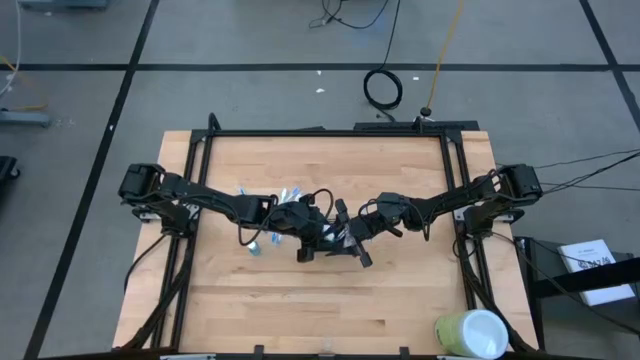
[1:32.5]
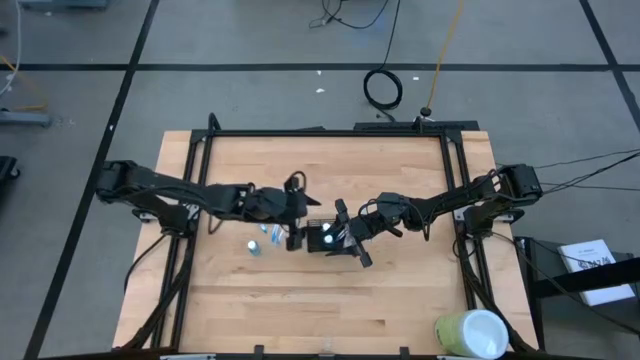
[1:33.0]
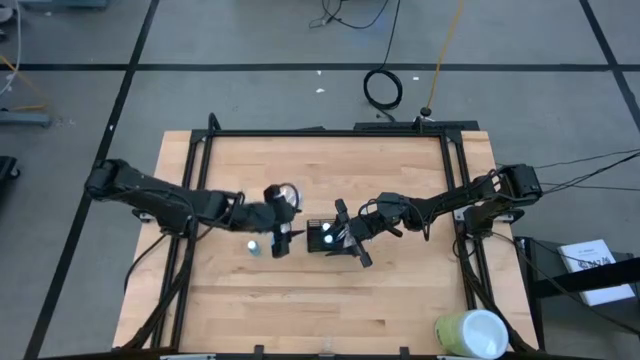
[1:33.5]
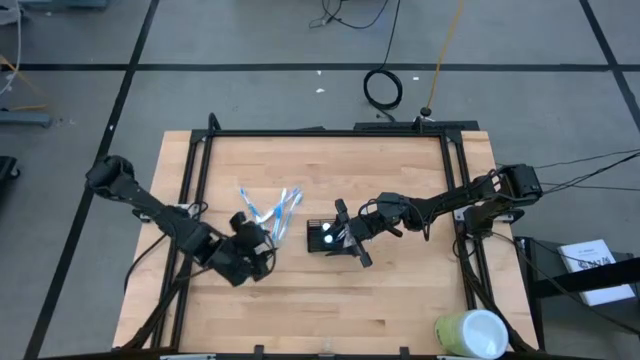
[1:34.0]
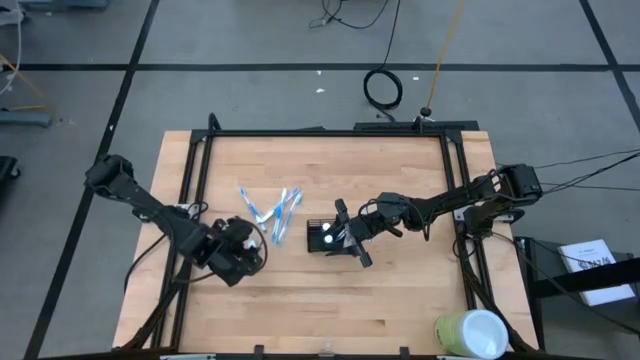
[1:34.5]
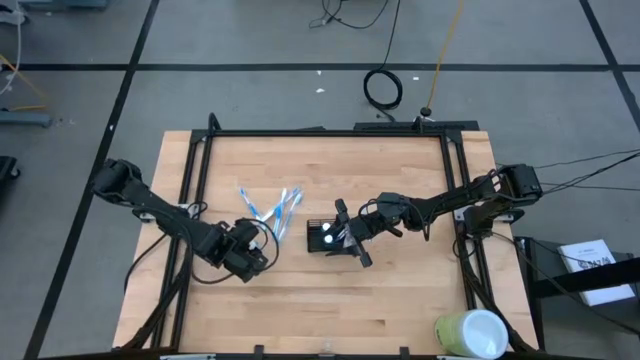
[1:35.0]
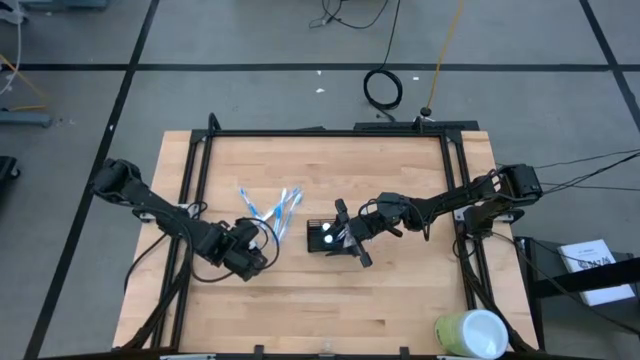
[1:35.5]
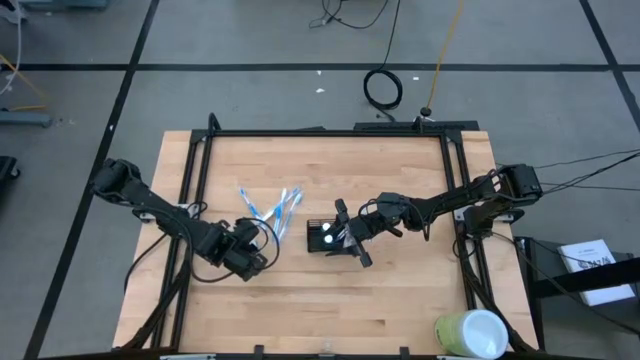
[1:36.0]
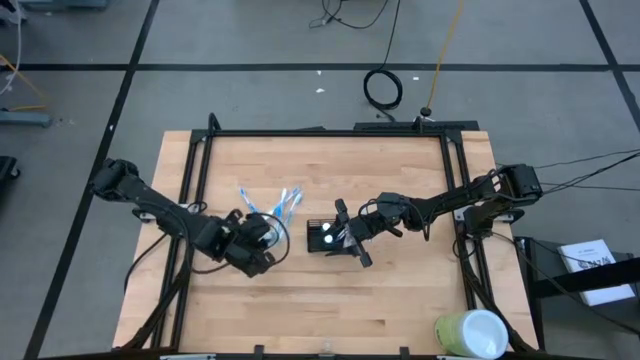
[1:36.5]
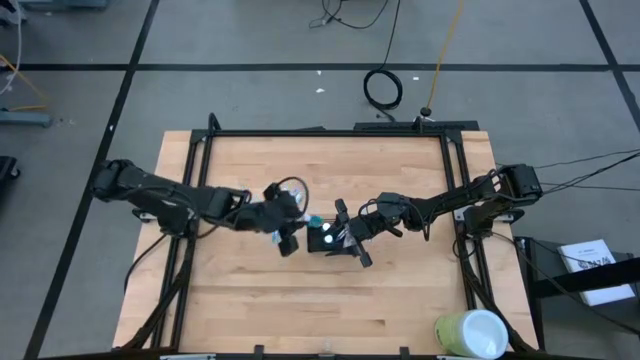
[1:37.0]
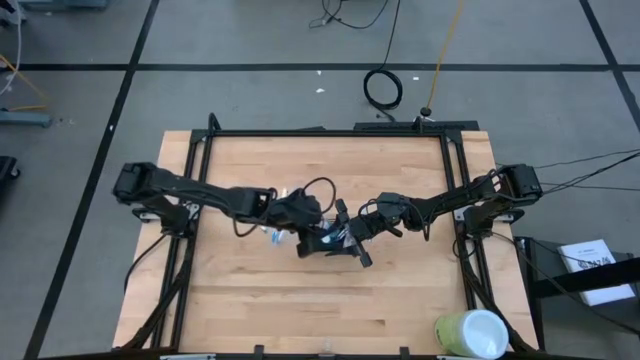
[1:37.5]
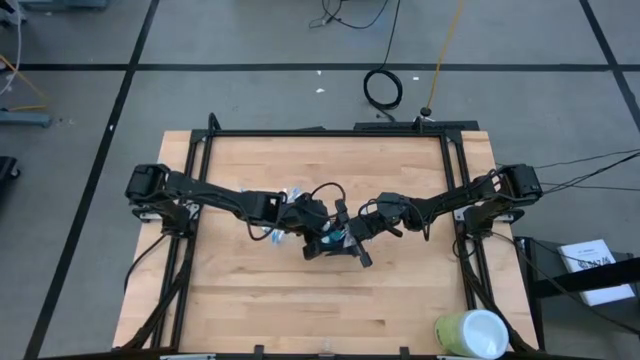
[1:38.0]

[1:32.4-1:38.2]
Task: Pick & Place toothbrushing station
Put the mouthwash into the middle section of the wire organizer

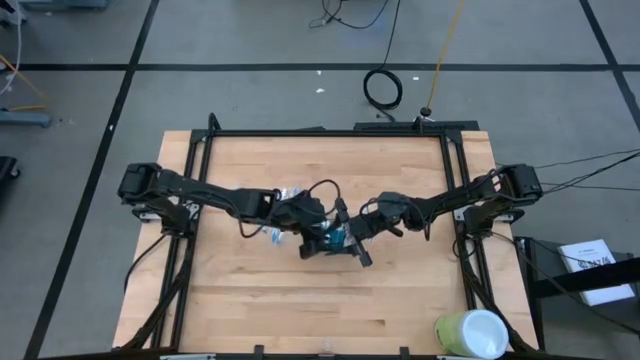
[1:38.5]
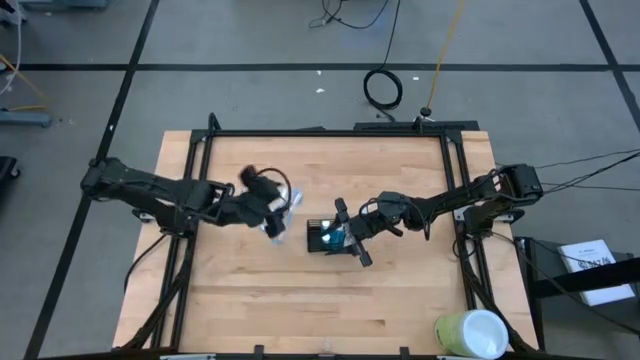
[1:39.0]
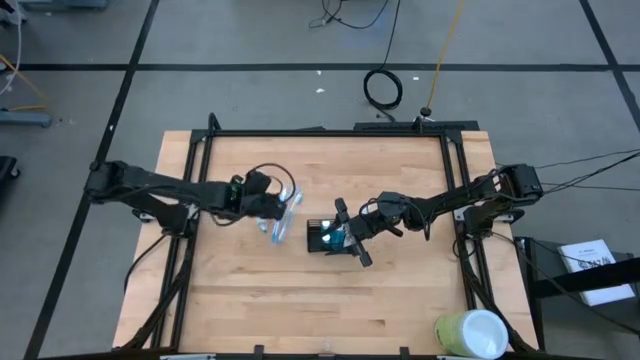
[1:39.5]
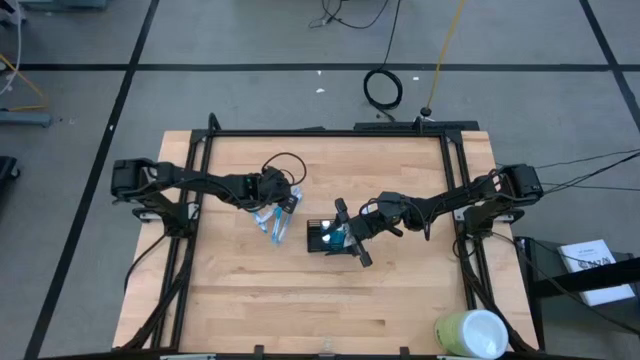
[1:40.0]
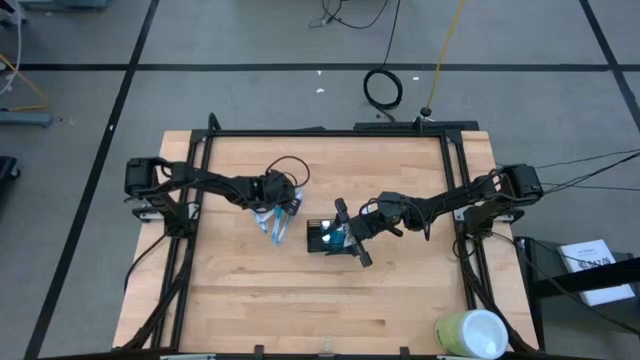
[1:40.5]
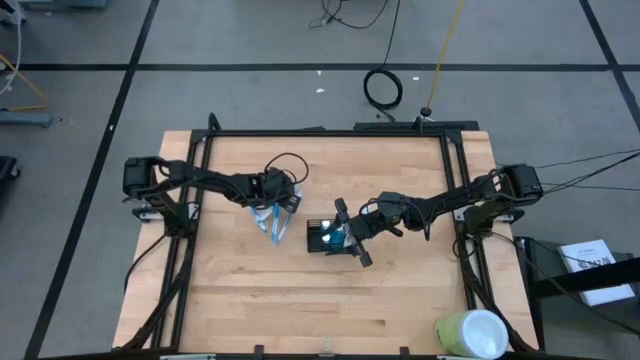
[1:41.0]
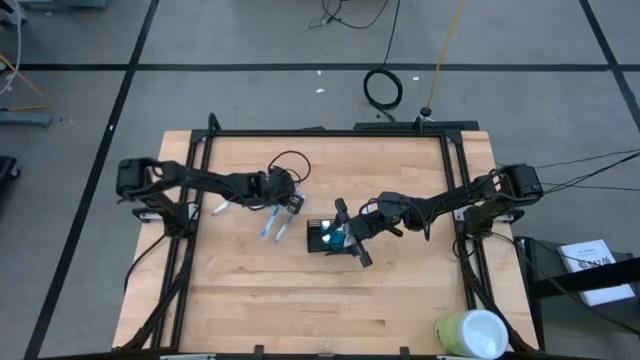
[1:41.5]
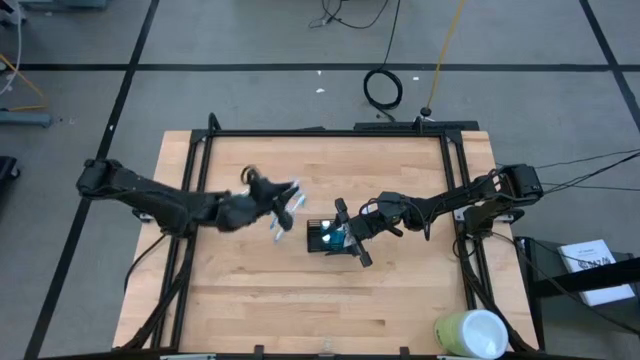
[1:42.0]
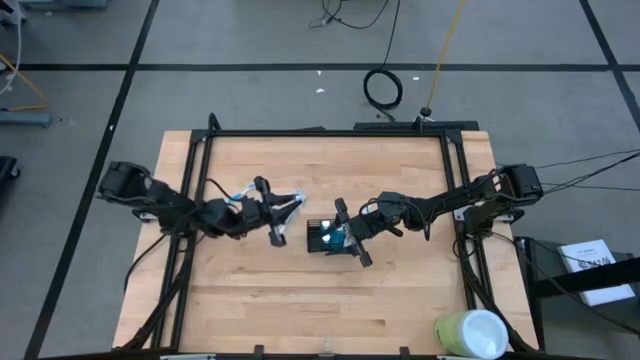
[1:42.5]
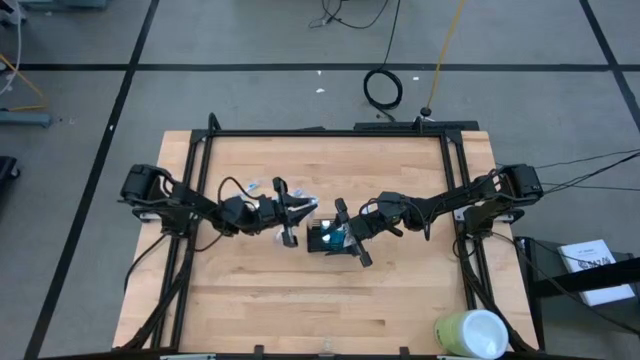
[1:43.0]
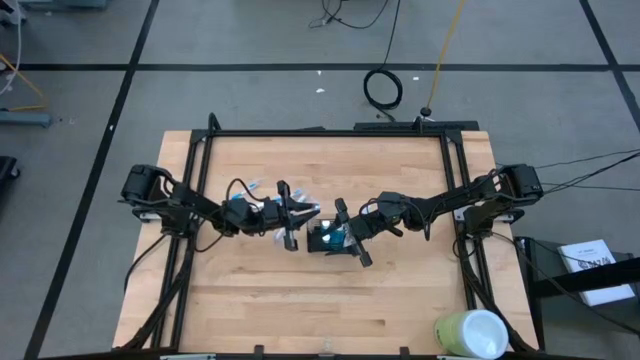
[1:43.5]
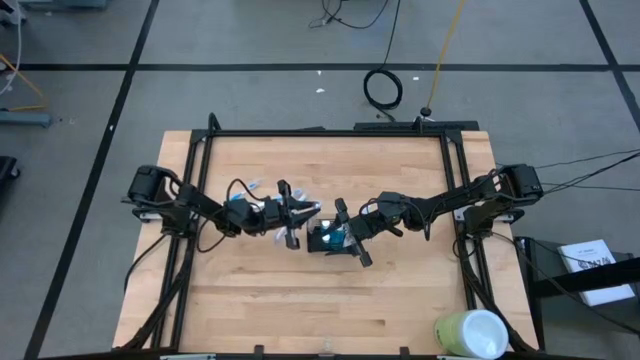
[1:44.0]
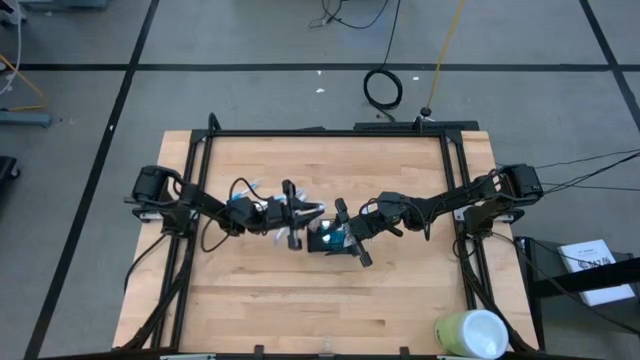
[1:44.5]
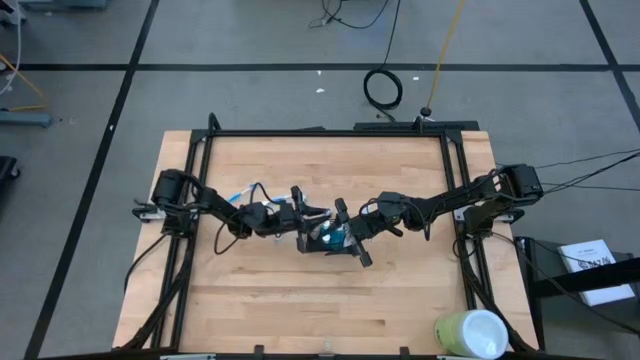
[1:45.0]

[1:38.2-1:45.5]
Put the blue toothbrush into the left section of the wire organizer

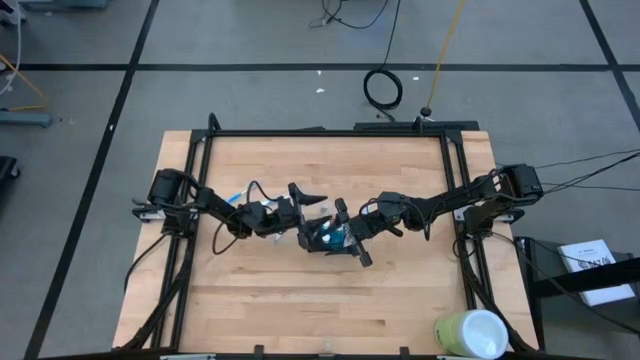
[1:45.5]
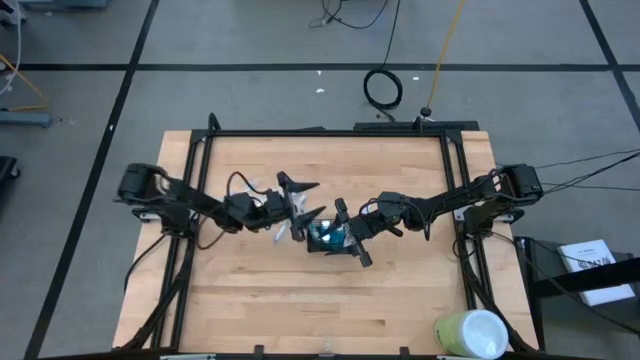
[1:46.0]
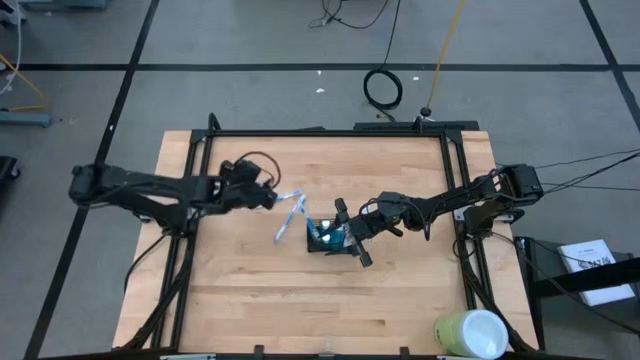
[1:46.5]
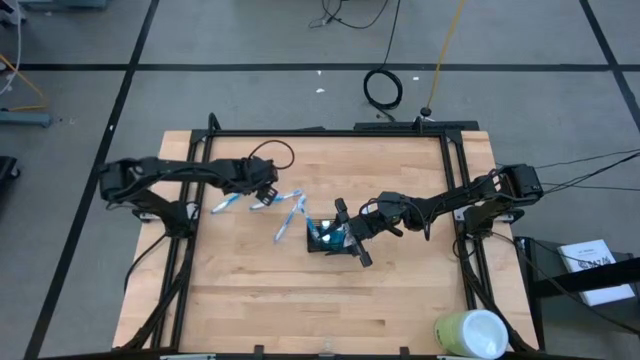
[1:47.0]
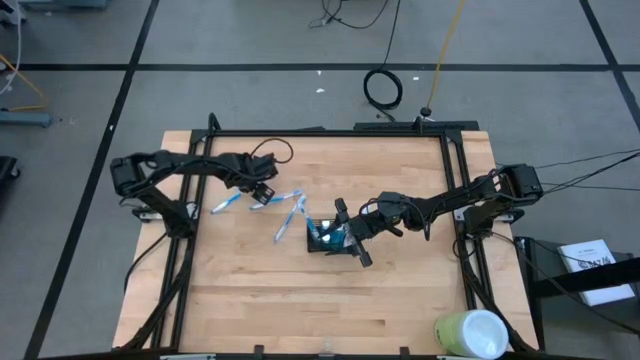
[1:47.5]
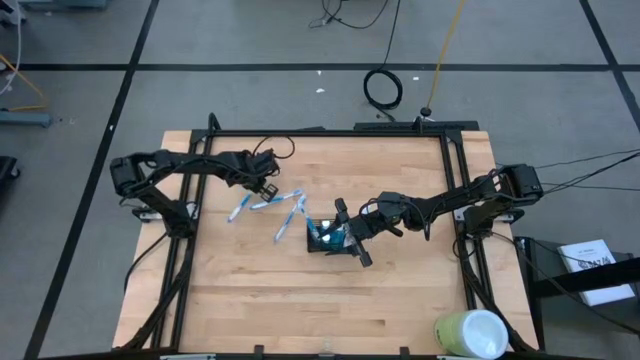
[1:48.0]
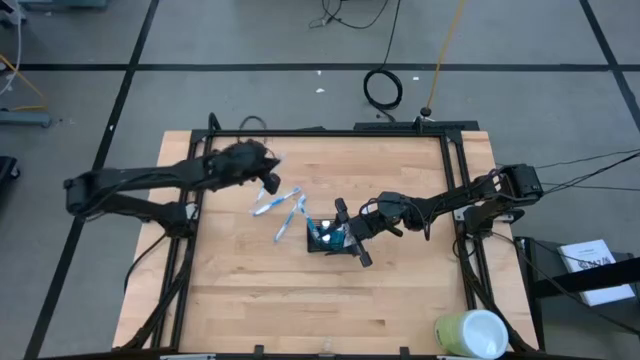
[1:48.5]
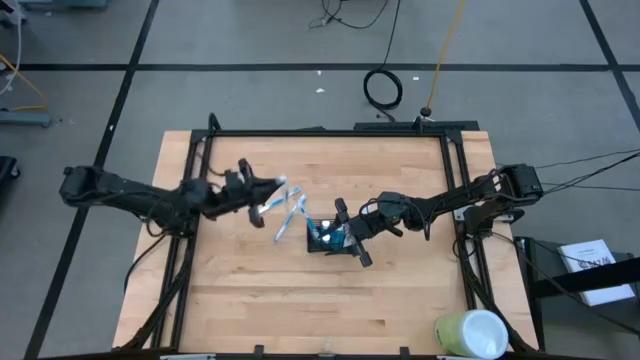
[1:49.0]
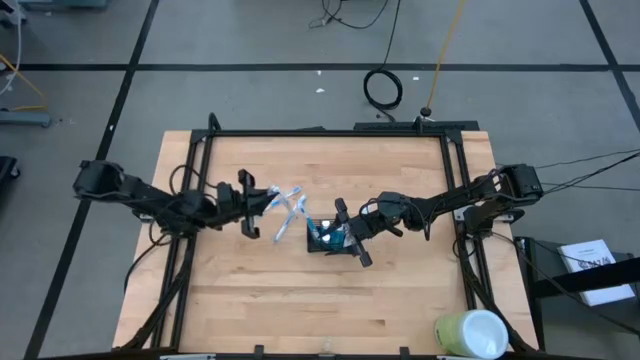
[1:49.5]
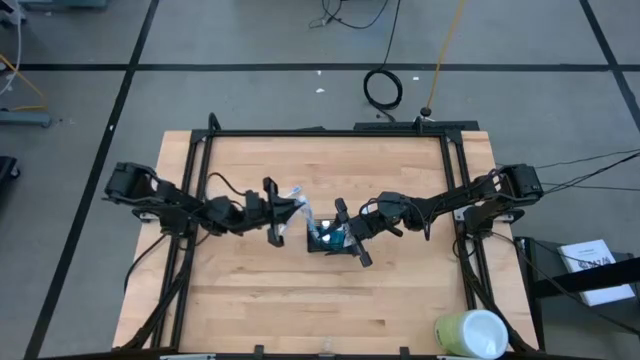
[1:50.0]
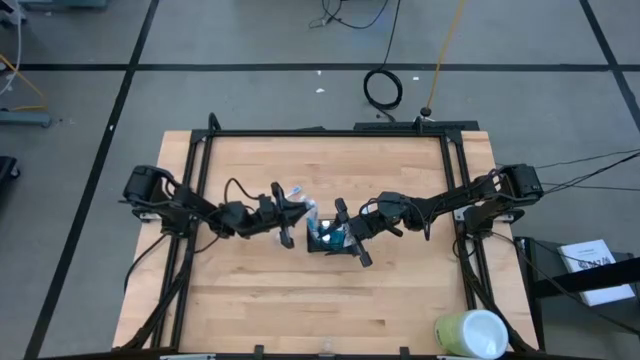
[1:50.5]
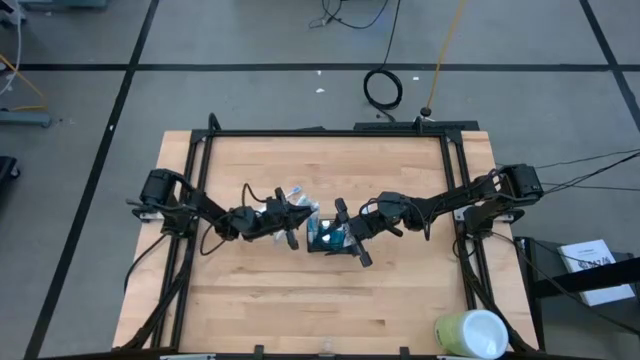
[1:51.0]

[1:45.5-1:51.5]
Put the blue toothbrush into the left section of the wire organizer

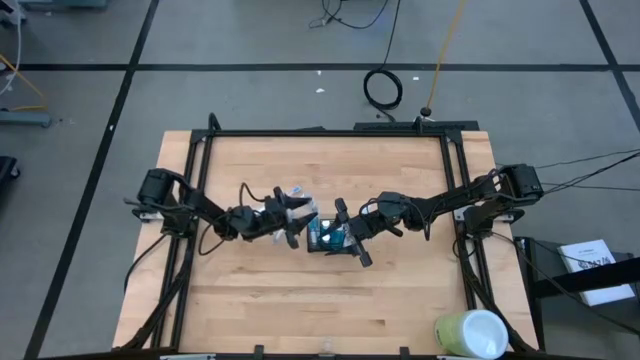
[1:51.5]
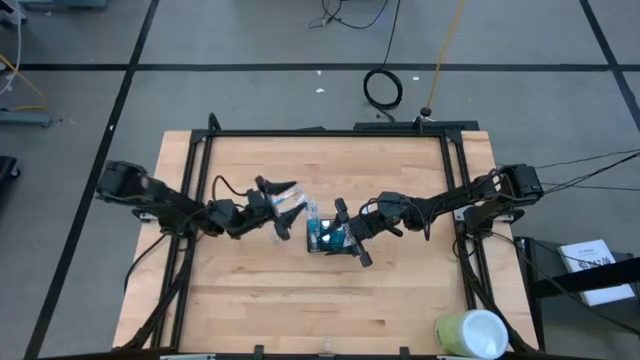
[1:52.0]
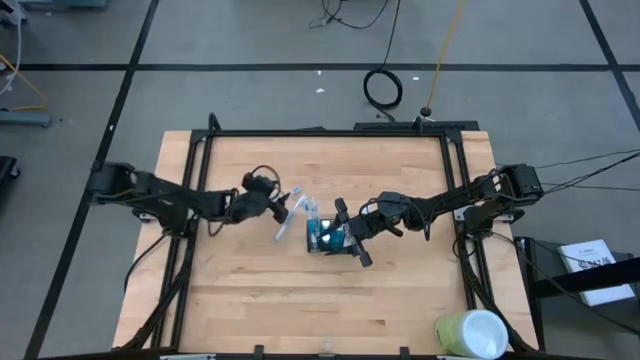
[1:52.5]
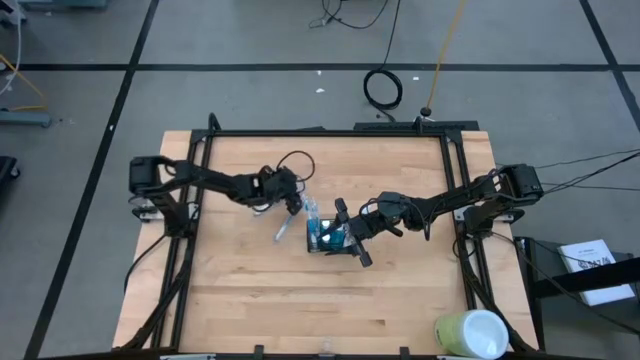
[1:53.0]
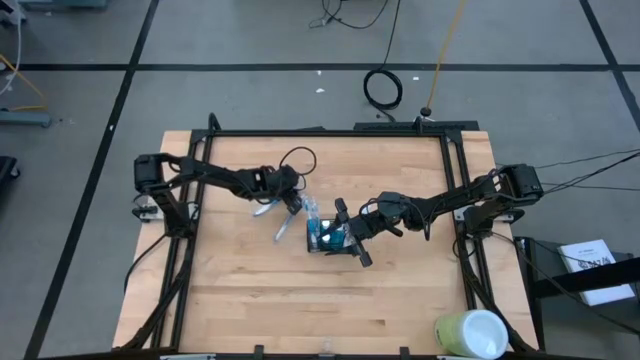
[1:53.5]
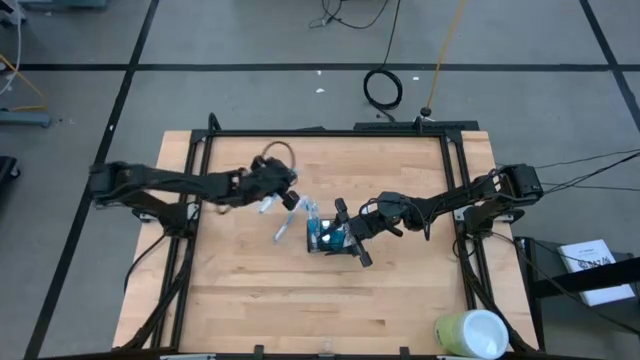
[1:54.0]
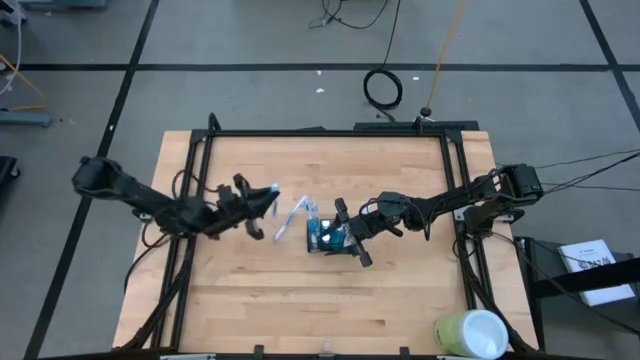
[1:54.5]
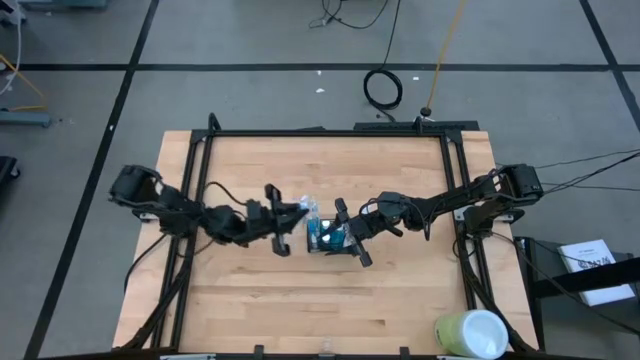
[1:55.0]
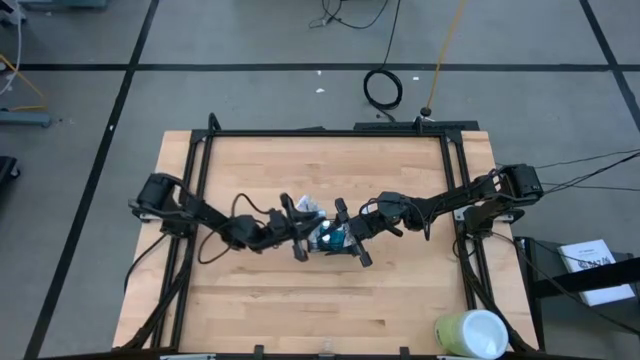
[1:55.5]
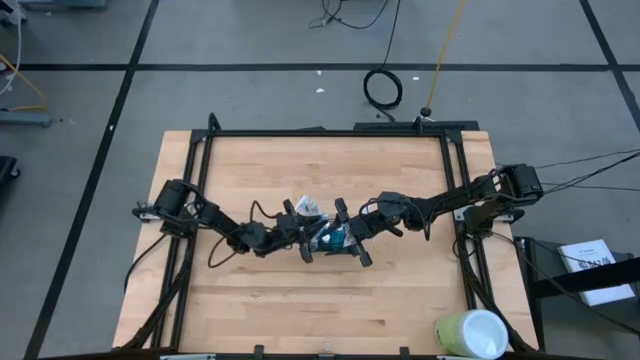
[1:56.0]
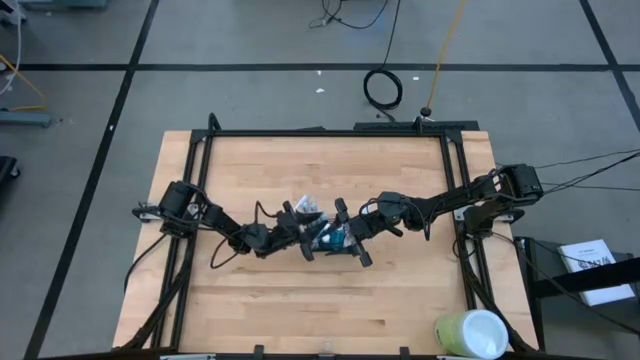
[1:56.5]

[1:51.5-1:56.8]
Put the blue toothbrush into the left section of the wire organizer
